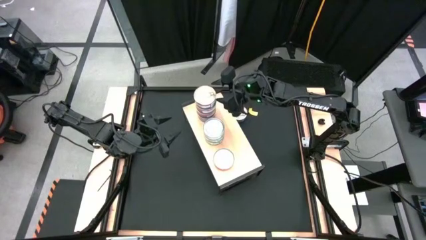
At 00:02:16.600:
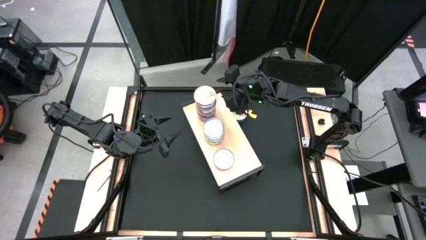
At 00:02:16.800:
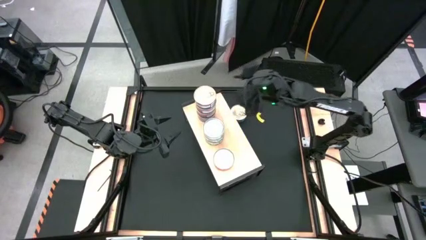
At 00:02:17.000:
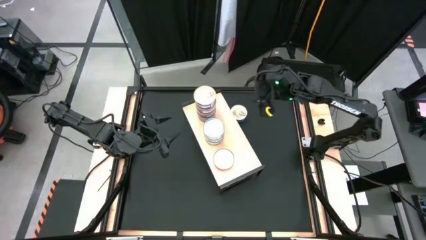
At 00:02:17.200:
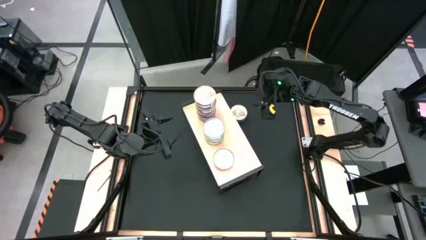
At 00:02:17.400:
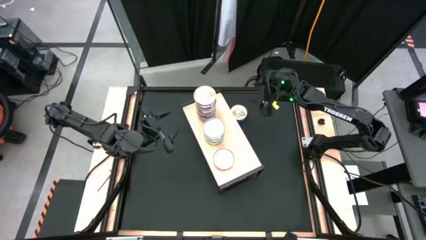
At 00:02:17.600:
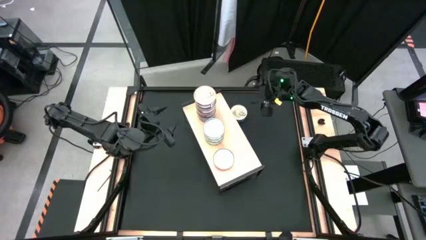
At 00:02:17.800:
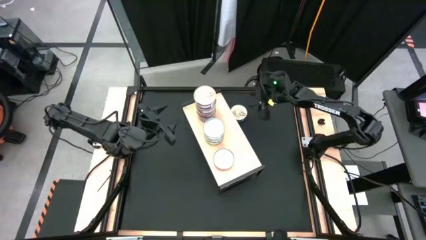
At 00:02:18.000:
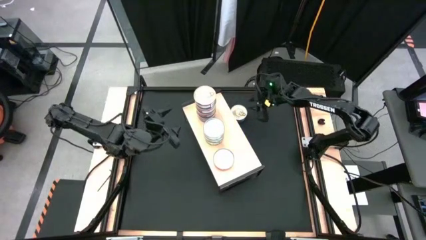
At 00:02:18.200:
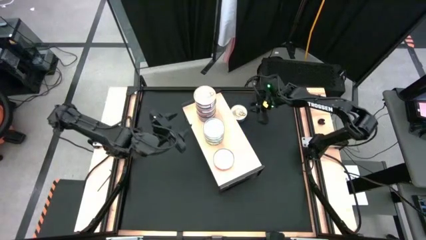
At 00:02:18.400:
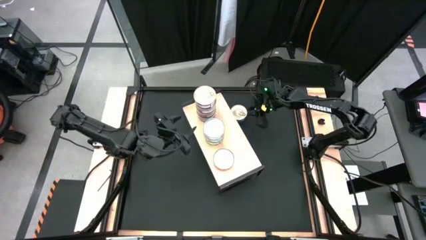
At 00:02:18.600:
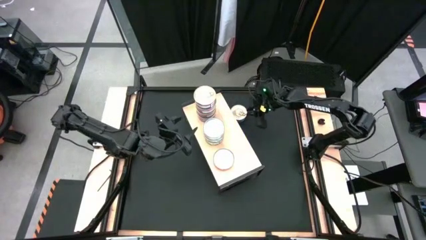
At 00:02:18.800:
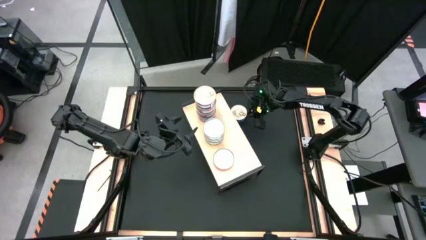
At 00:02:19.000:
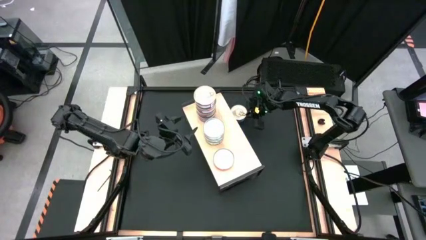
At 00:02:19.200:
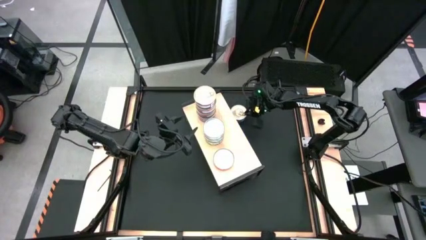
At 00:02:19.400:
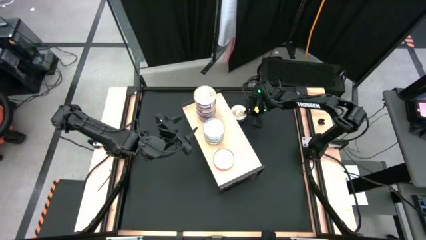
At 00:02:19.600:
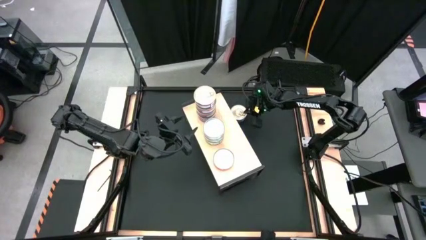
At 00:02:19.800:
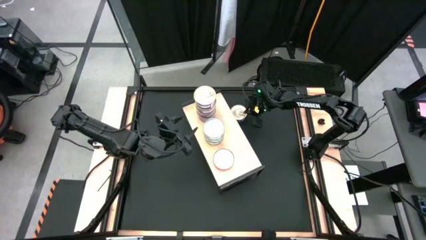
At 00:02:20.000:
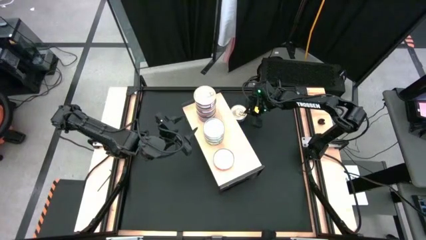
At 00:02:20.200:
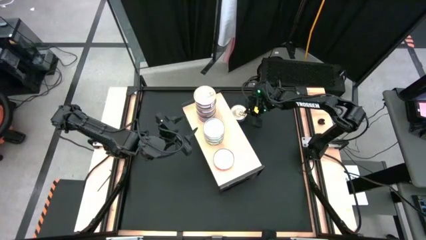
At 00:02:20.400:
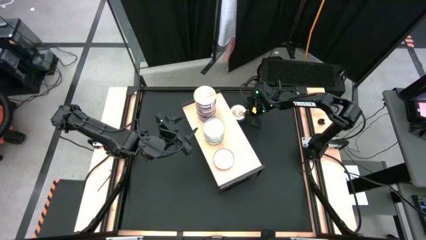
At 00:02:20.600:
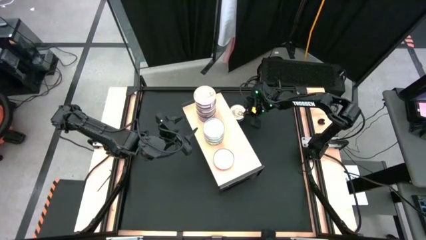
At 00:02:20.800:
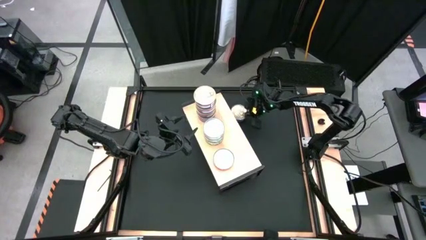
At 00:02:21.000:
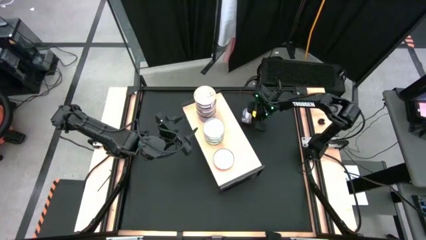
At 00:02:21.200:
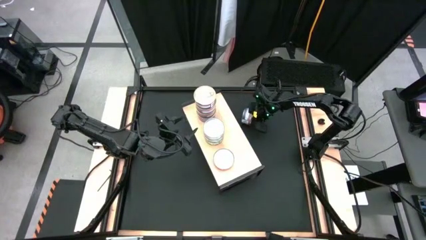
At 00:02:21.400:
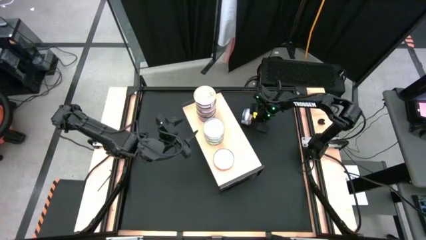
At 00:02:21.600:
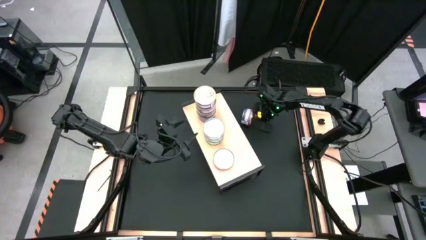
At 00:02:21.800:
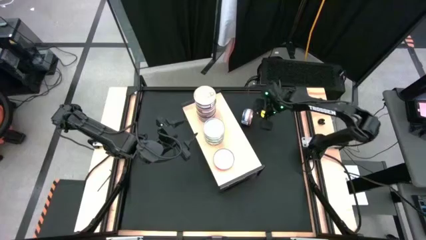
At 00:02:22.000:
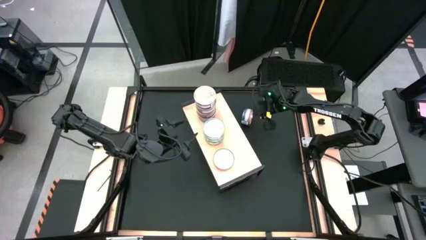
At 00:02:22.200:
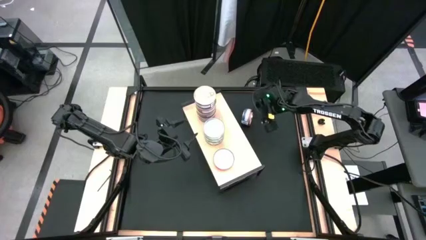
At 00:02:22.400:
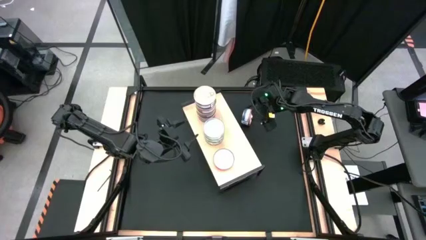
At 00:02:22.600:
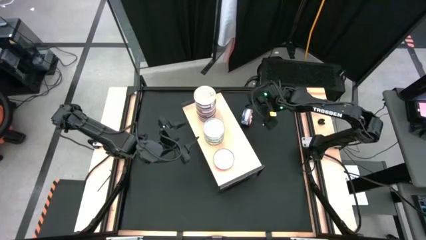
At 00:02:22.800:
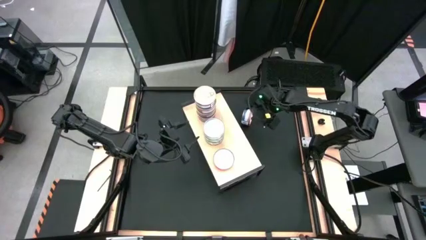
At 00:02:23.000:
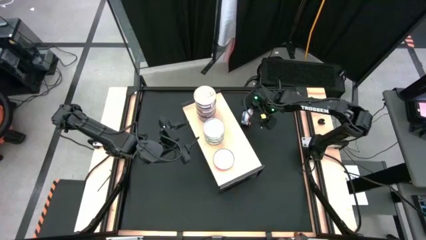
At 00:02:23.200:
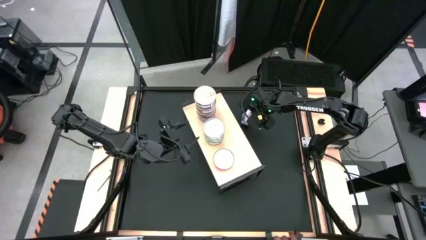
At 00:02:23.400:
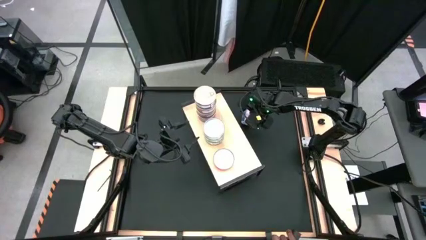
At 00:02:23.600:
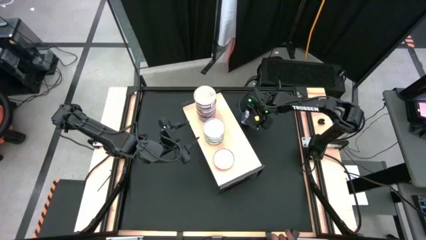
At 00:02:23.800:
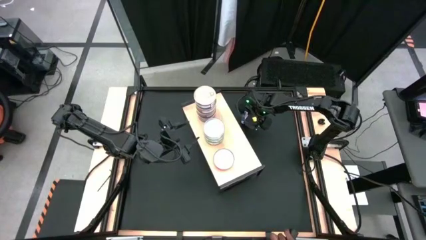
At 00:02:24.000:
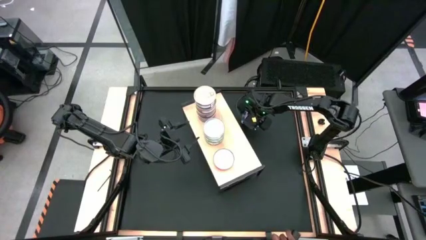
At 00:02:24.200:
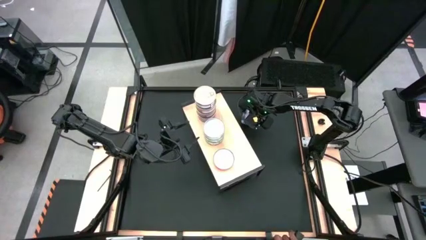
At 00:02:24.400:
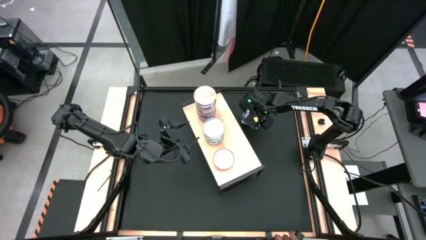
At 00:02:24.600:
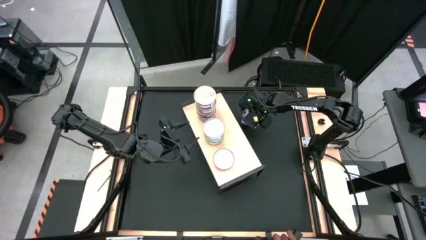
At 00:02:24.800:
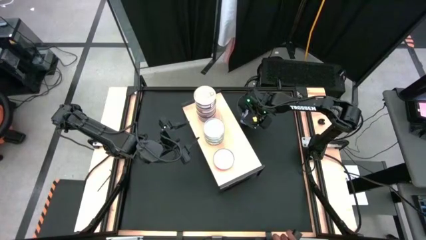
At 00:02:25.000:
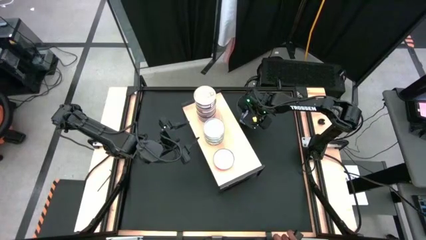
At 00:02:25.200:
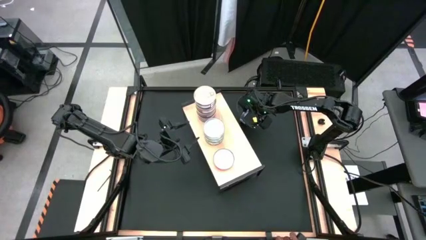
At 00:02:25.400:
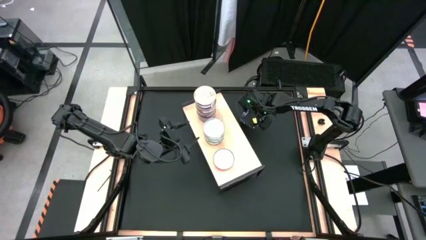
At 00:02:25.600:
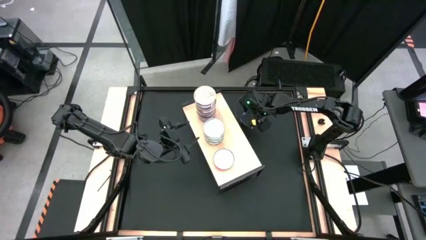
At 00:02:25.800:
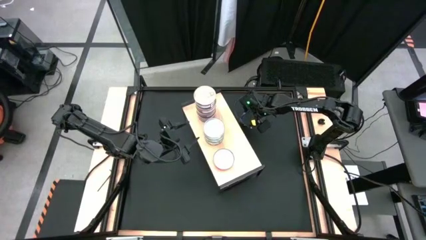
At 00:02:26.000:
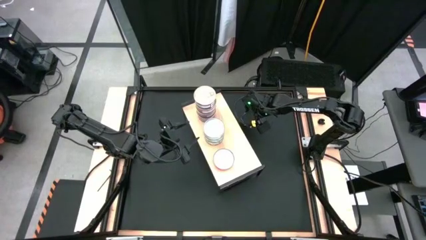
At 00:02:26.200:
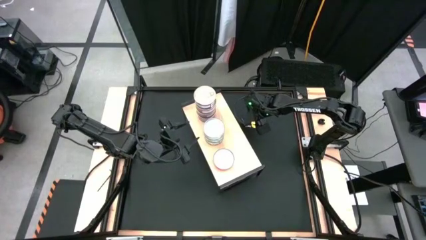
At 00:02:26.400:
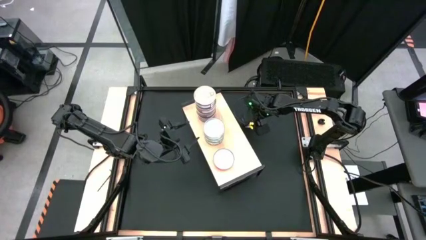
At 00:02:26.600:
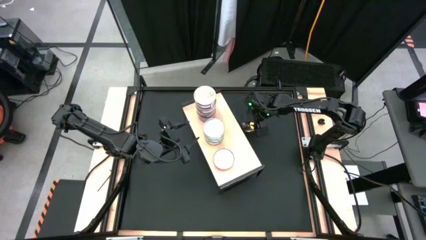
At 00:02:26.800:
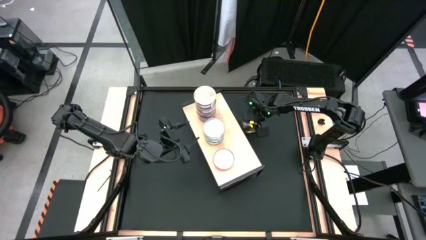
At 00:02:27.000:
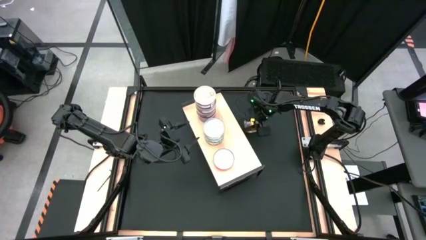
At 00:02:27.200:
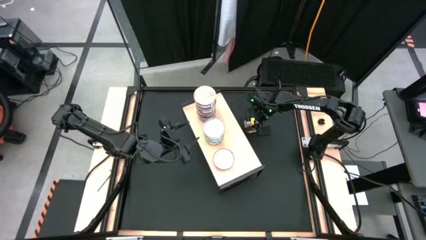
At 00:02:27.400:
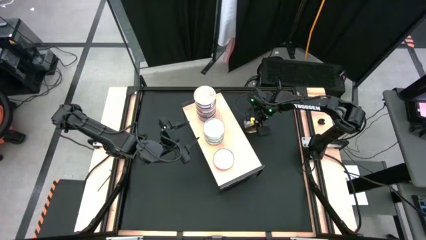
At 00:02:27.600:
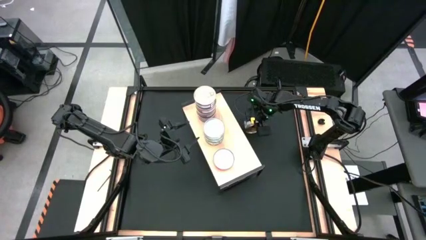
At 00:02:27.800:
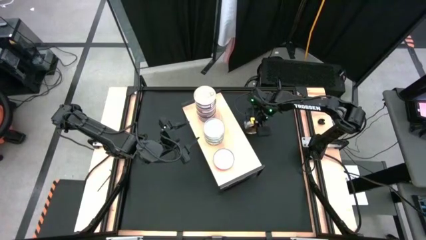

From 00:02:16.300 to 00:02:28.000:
Task: Stack canned seafood by type on shelf
Stack the blue pink tuna can on top of the blue pink tuna cans on the shelf

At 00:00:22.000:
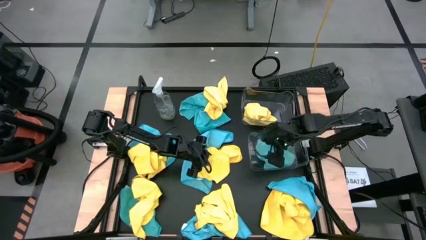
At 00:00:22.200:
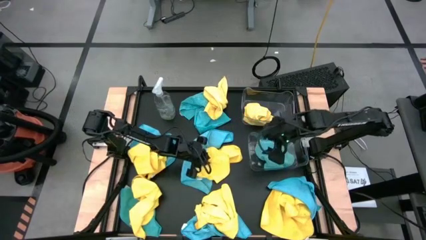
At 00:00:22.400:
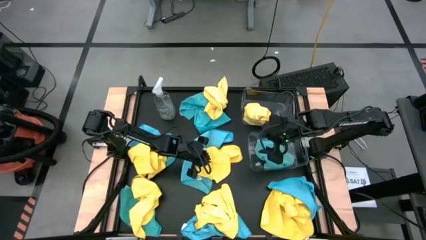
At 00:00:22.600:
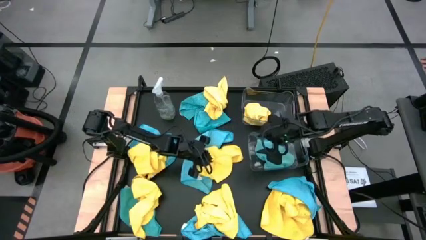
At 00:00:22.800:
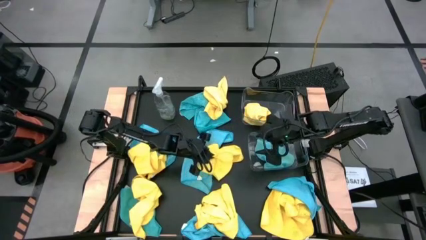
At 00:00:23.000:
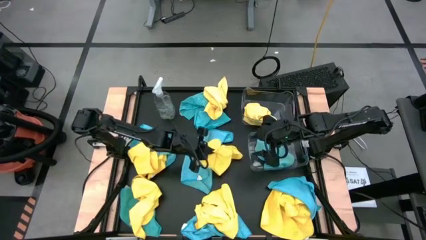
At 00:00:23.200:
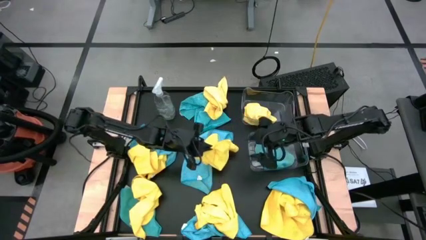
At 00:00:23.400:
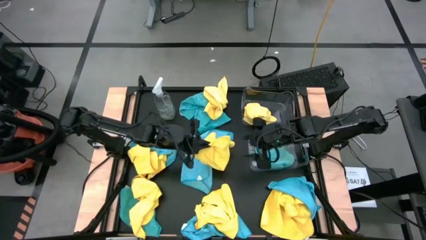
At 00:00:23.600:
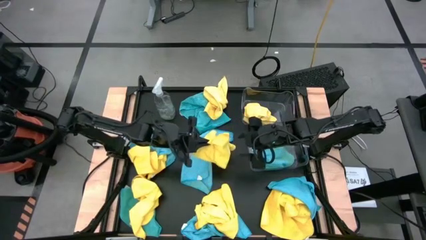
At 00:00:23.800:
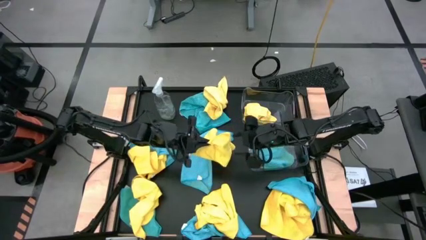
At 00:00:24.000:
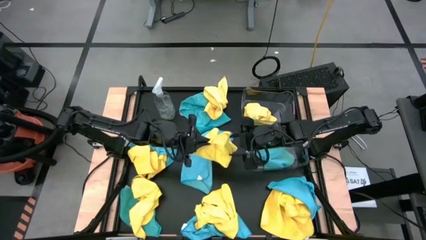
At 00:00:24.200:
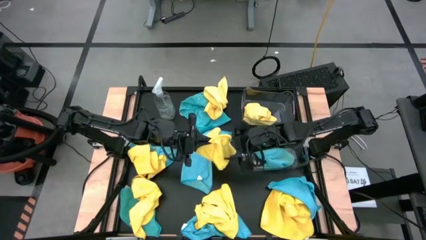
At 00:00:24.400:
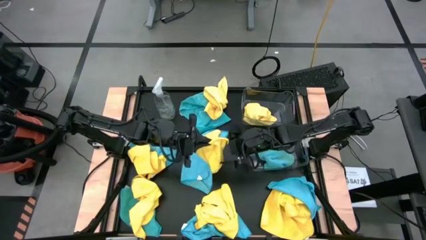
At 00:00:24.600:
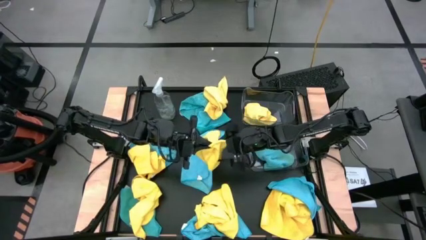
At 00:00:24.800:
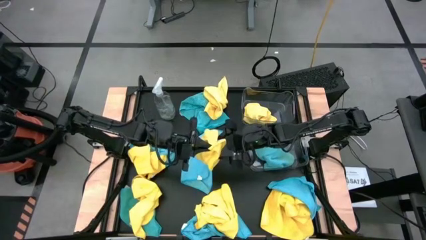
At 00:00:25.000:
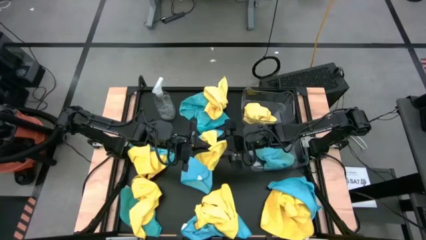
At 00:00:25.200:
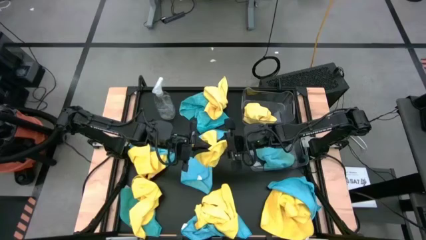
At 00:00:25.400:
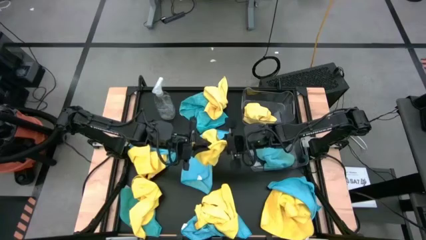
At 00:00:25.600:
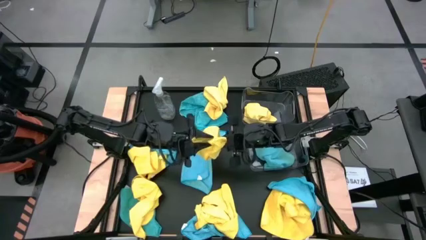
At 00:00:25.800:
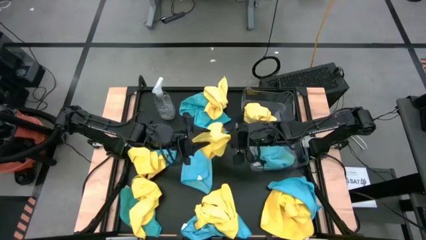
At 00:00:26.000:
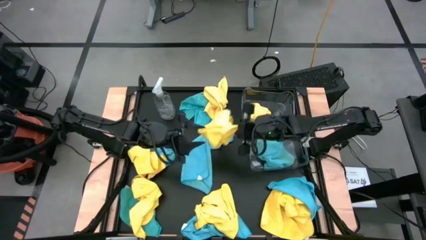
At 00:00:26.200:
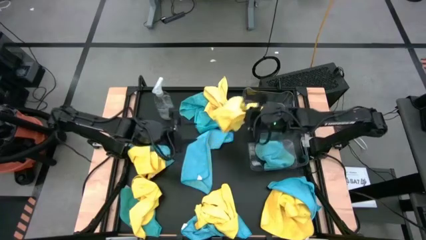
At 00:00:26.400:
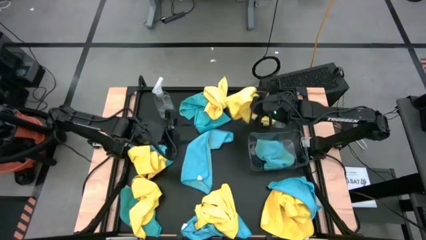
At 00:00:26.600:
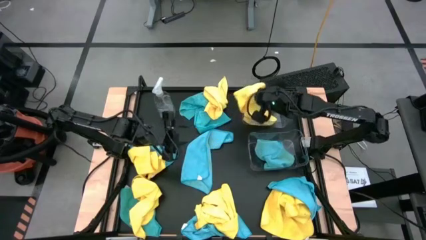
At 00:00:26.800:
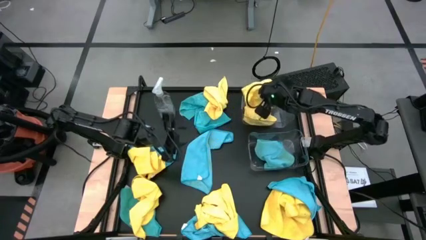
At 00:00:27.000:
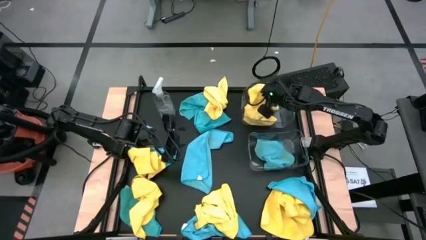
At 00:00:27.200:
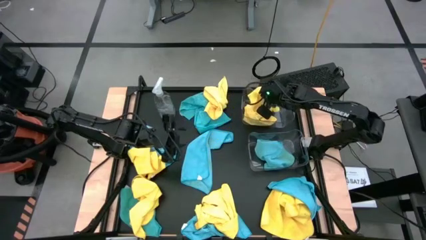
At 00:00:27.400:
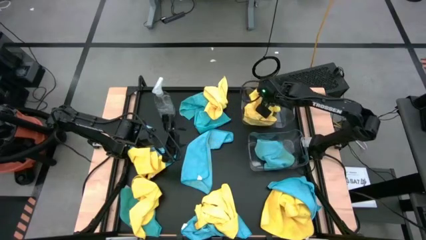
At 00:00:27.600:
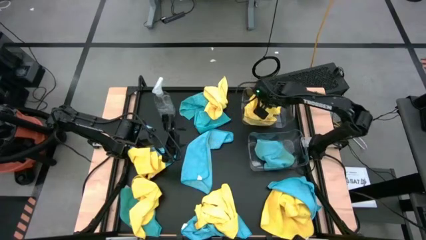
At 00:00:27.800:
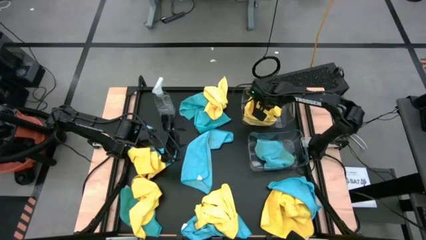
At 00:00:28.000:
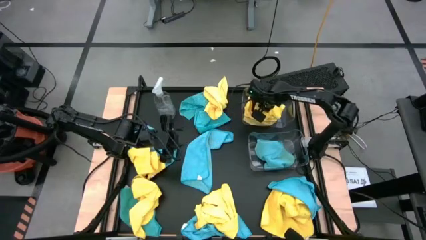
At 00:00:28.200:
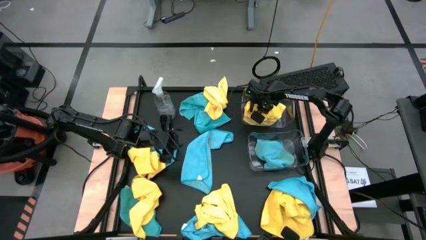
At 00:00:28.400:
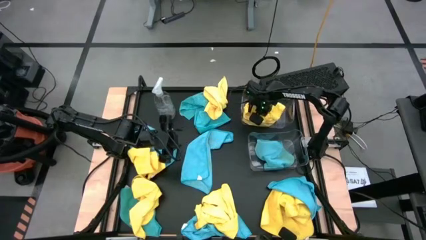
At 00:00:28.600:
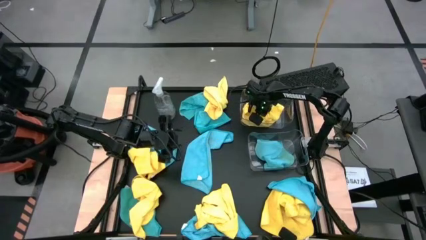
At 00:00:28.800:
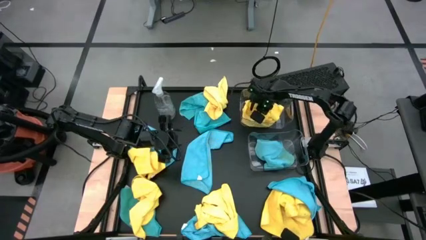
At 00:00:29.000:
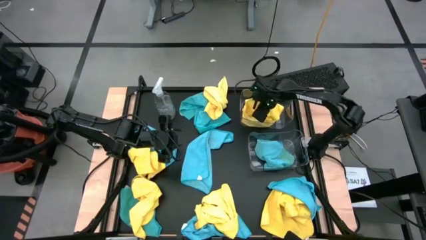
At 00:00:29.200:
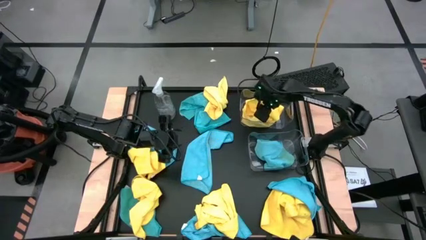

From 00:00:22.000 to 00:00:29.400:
Task: Sort microfiber towel by color & place in baskets
Put the yellow microfiber towel into the top transparent bin
